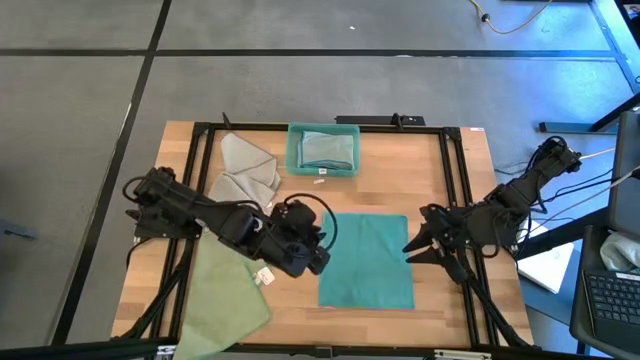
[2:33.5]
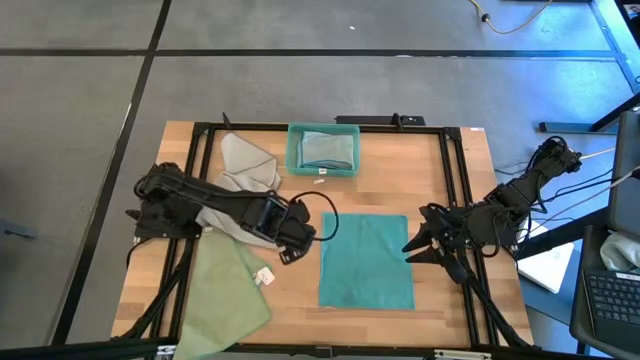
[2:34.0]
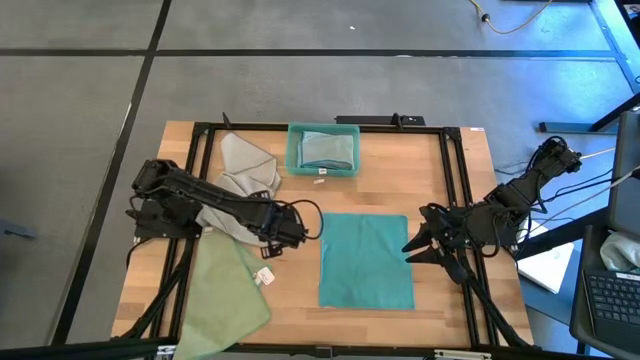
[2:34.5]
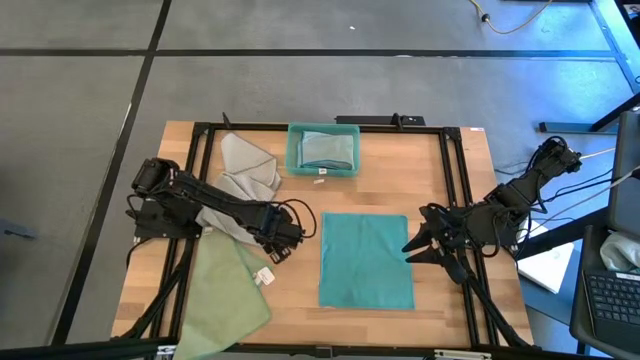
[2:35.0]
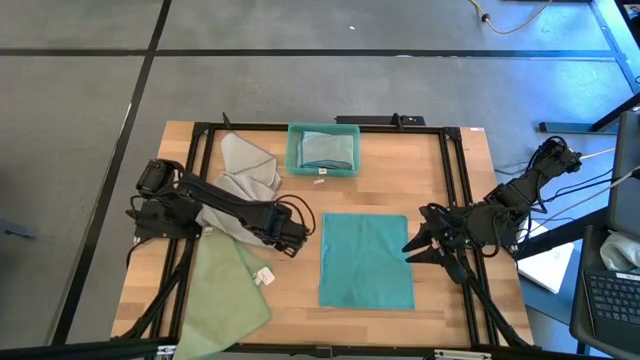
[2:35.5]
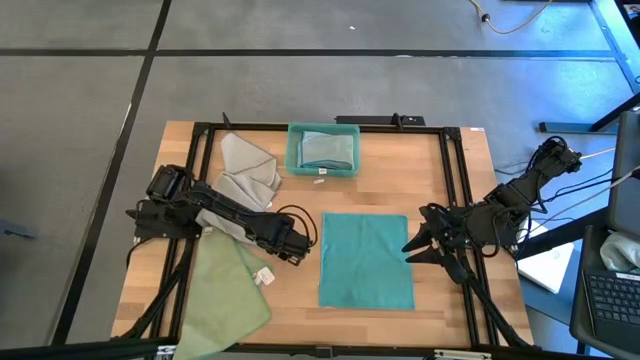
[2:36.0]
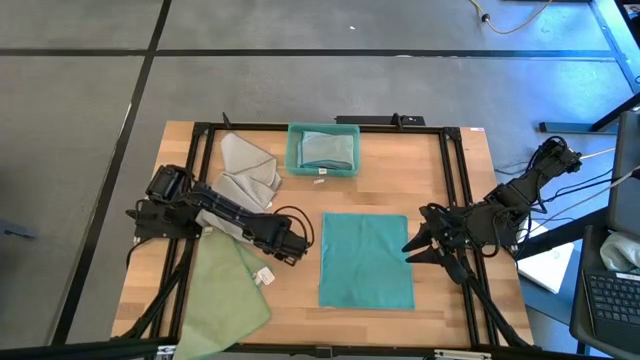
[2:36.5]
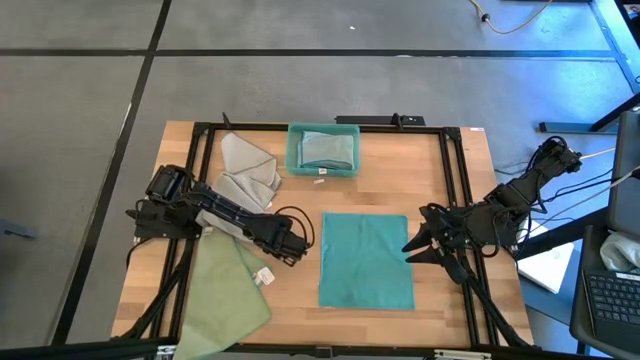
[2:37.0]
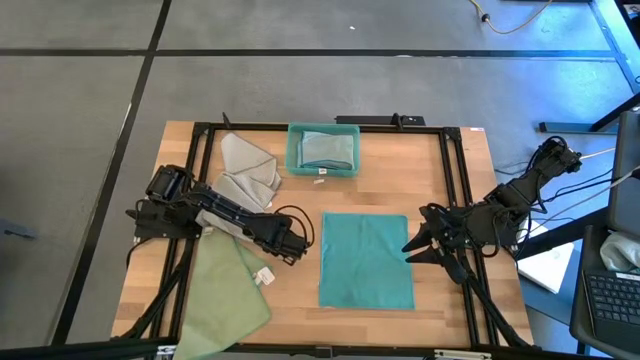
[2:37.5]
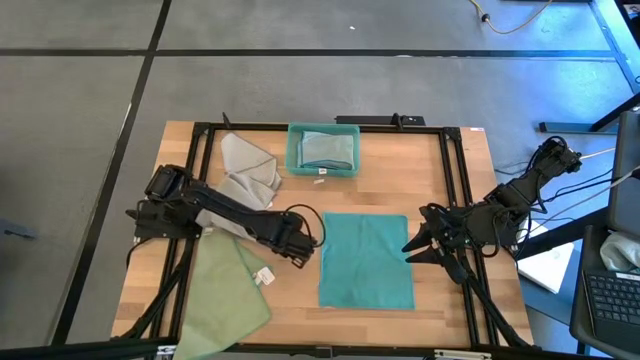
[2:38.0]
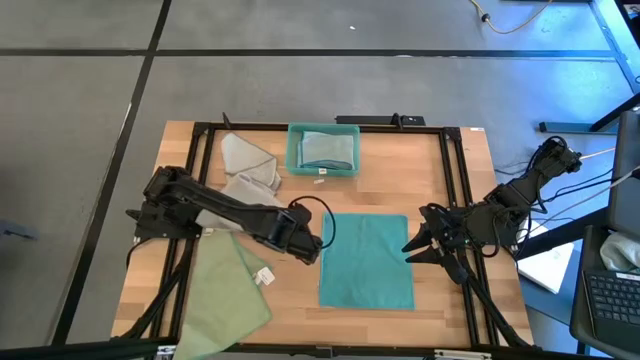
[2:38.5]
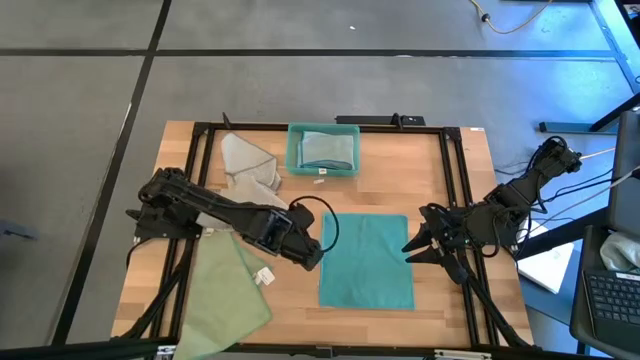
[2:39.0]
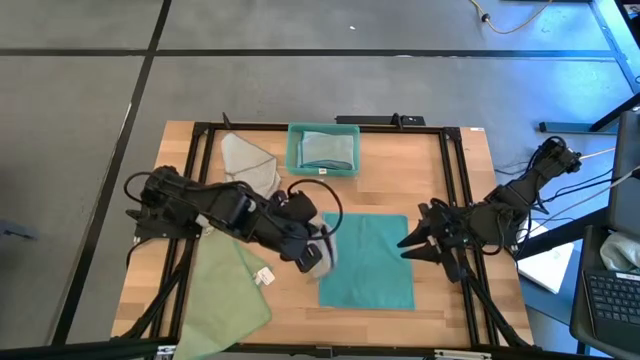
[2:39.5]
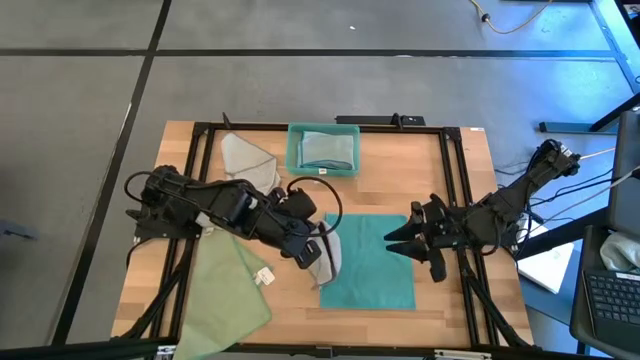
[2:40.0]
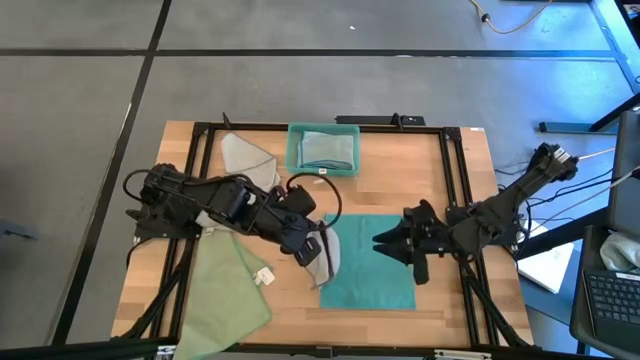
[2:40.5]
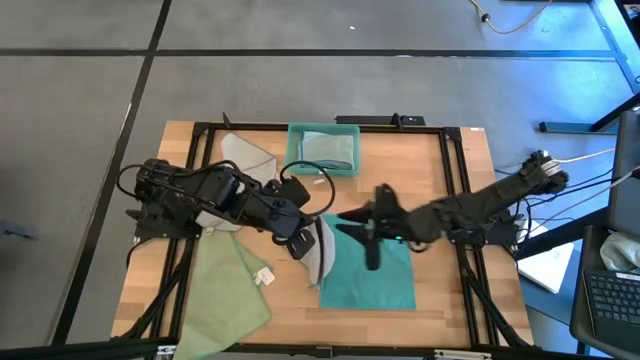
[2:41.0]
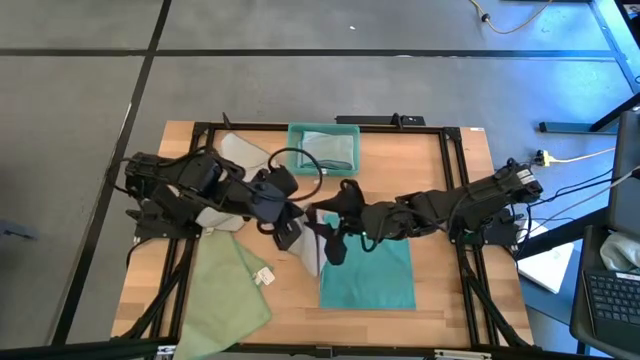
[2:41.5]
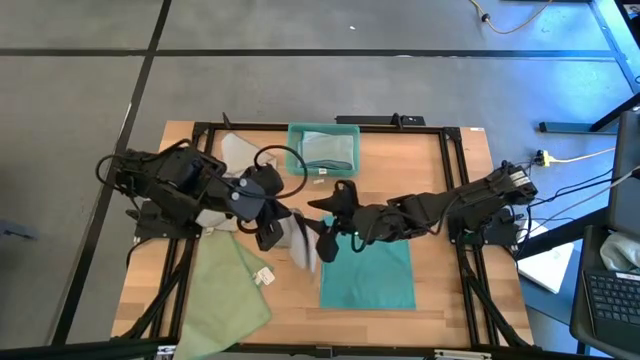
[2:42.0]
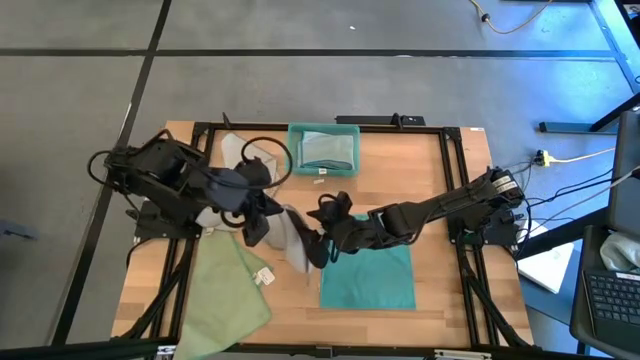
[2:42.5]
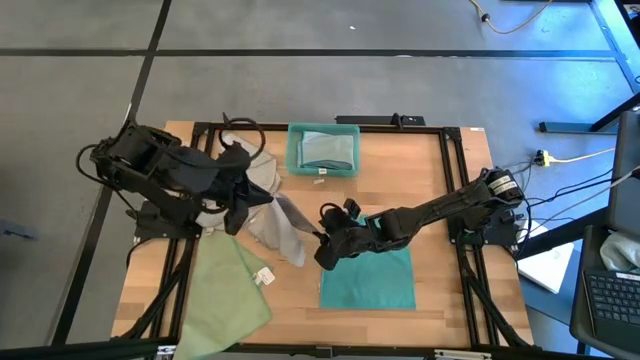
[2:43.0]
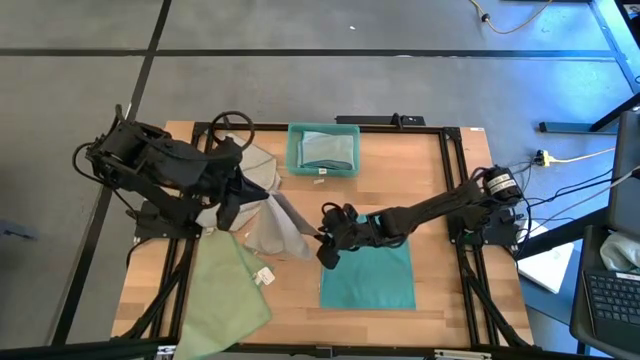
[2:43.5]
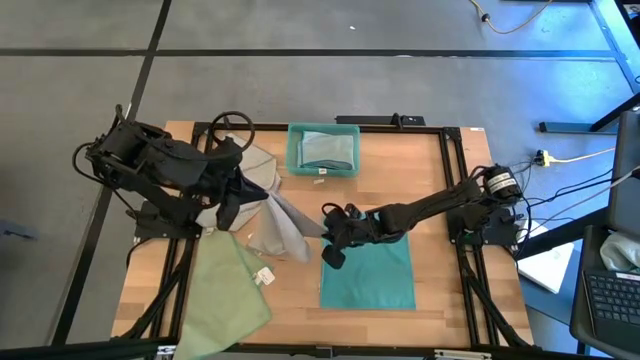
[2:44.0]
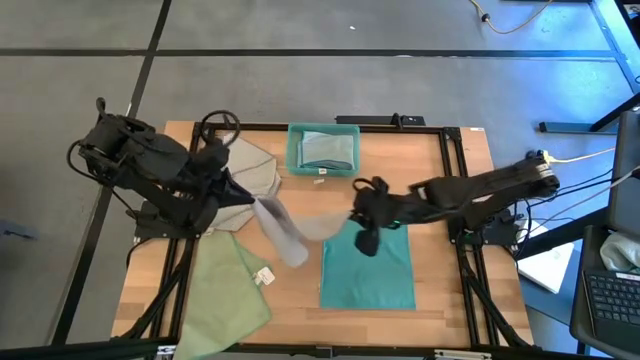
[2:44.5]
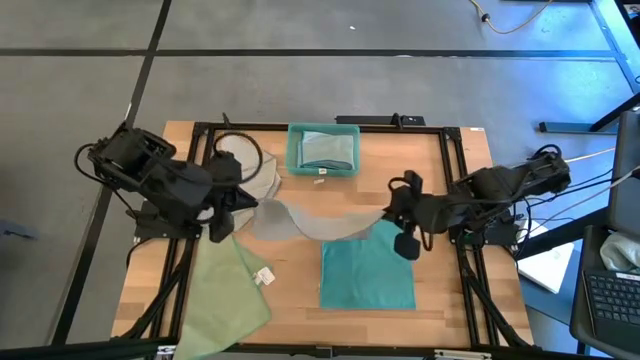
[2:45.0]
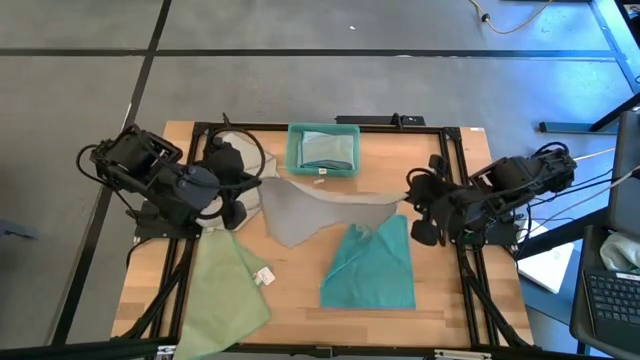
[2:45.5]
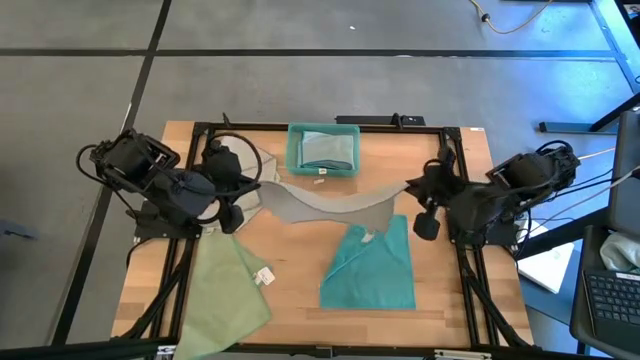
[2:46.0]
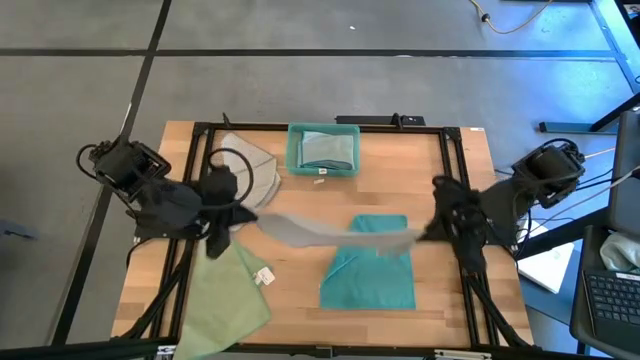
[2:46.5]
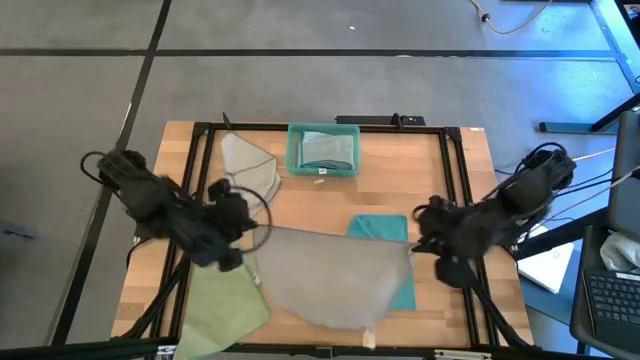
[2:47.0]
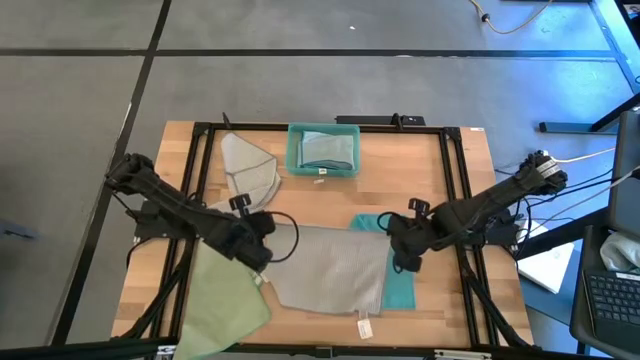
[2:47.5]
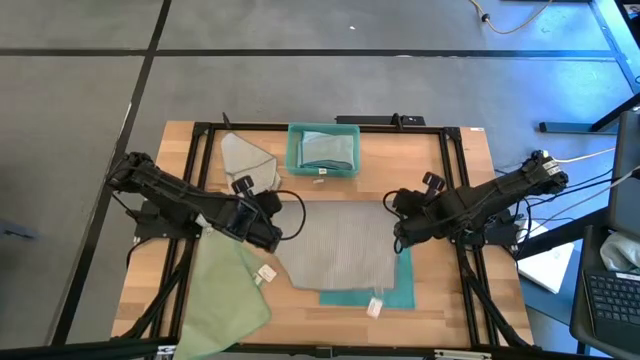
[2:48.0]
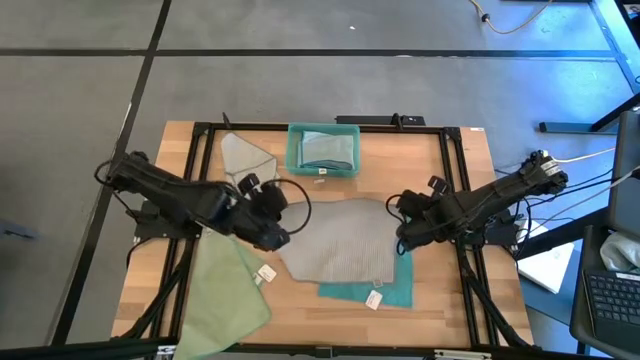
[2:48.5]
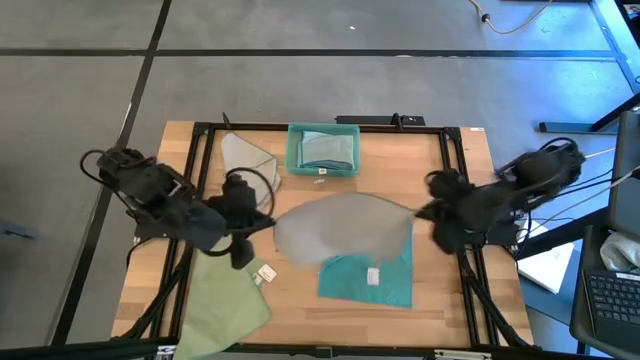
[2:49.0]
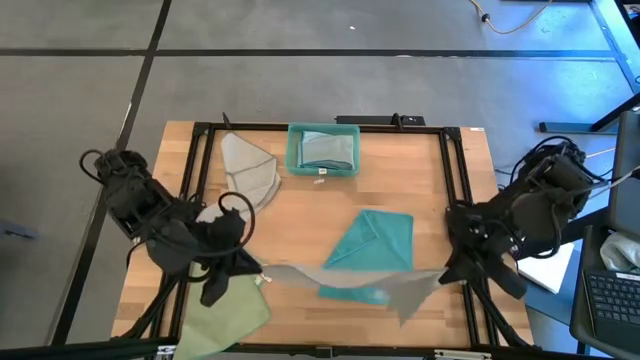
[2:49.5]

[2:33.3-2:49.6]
Task: Fold microfiber towels
Fold the gray towel

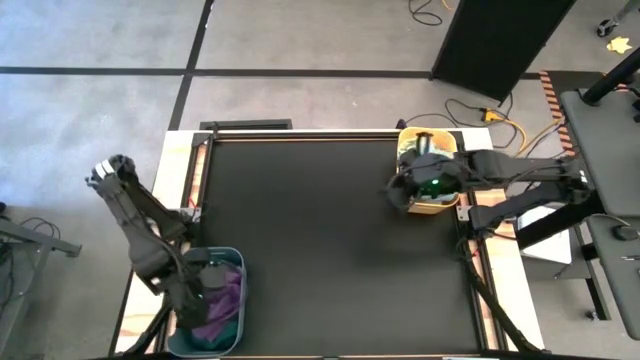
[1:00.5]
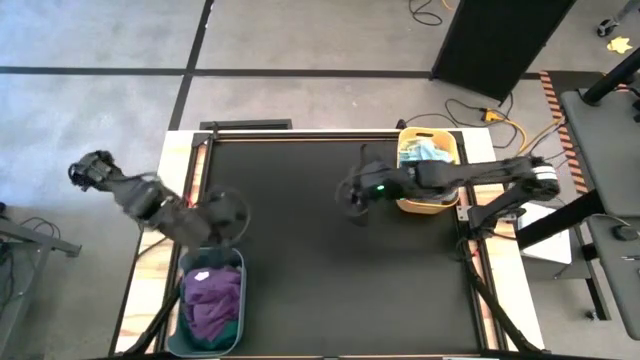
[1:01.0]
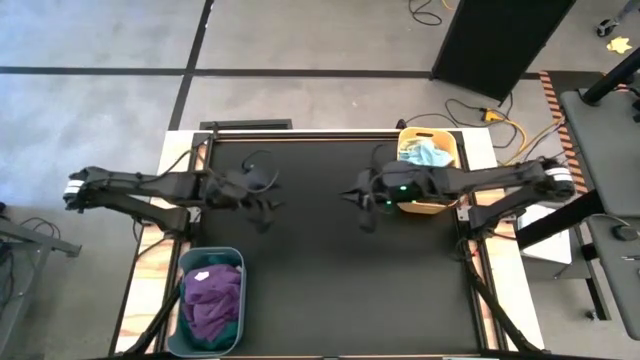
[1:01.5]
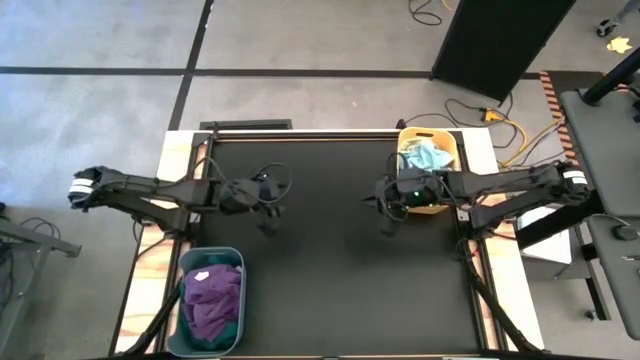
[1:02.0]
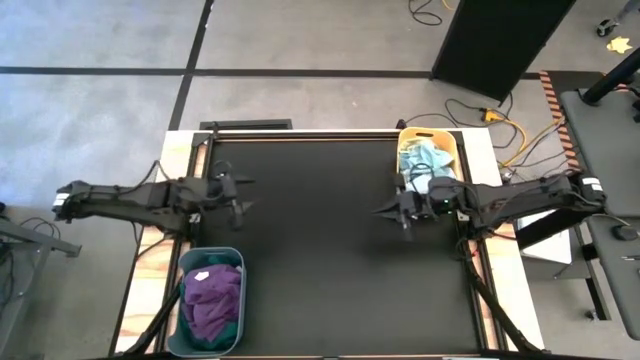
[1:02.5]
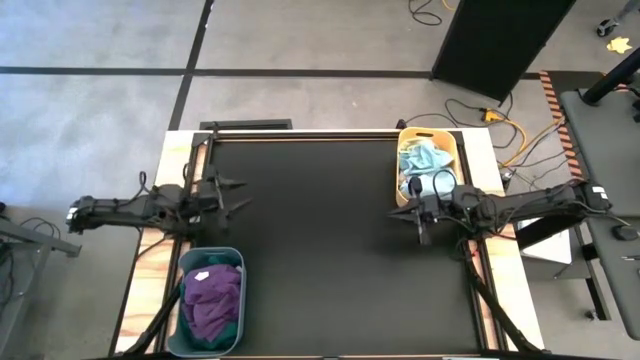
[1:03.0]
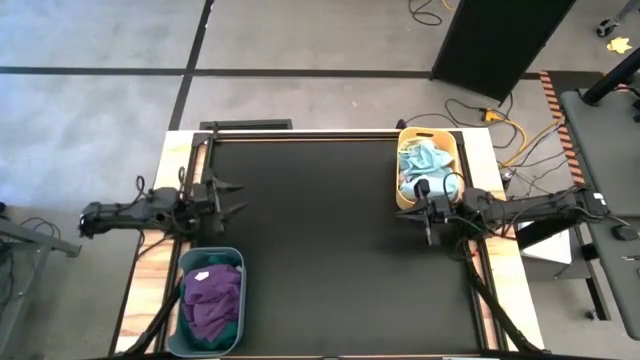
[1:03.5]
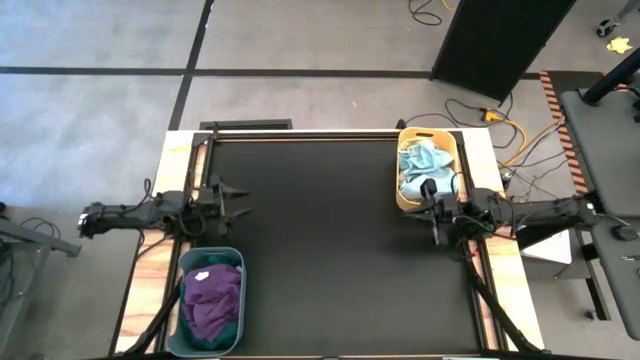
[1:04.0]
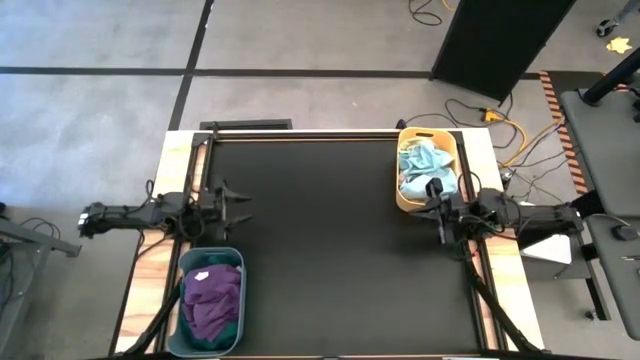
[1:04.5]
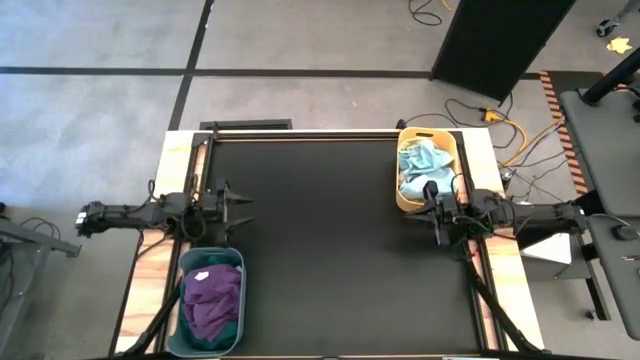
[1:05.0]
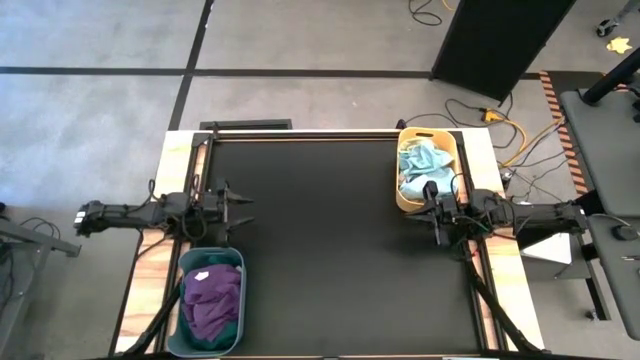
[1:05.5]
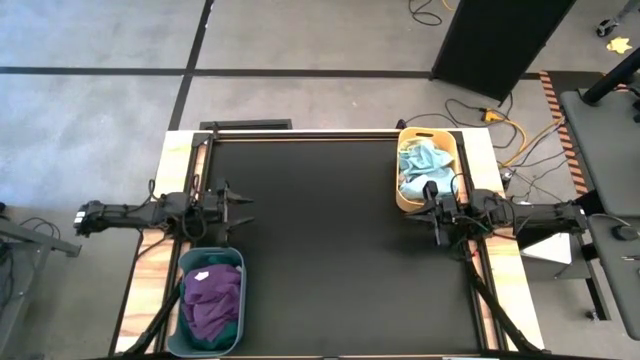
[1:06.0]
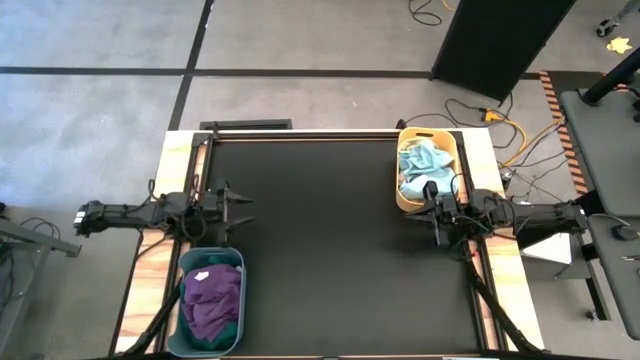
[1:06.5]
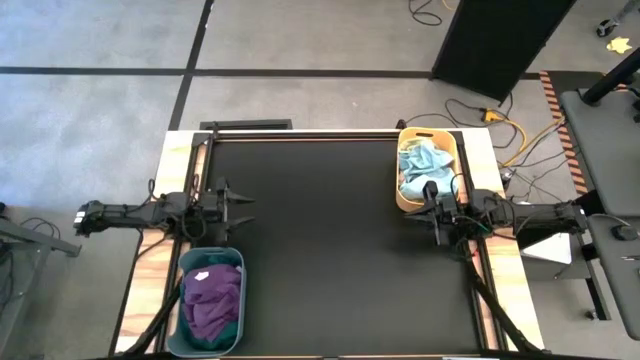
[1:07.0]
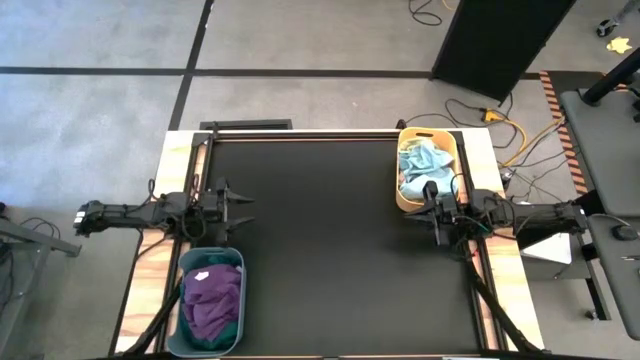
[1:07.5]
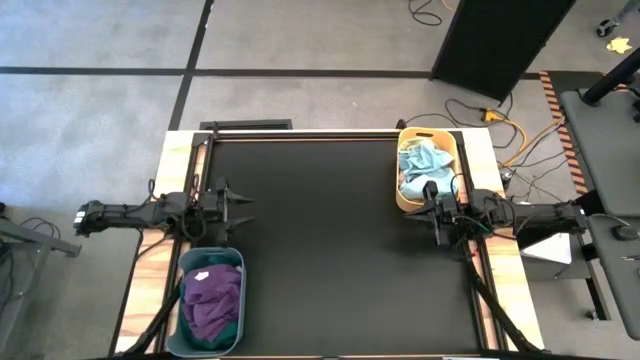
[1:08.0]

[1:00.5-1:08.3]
Task: Sort microfiber towel by color & place in baskets
Return to Home Position
